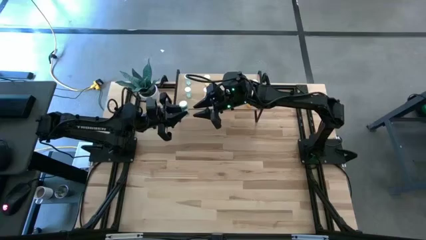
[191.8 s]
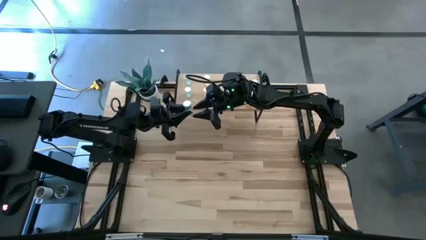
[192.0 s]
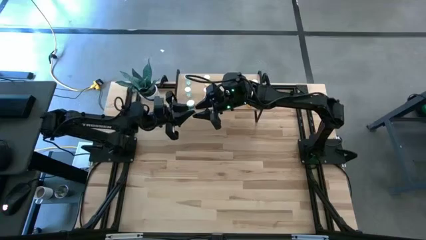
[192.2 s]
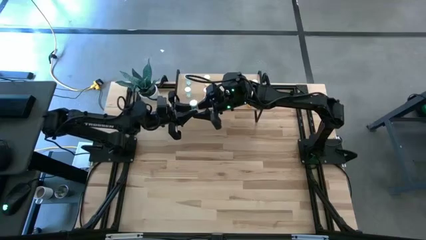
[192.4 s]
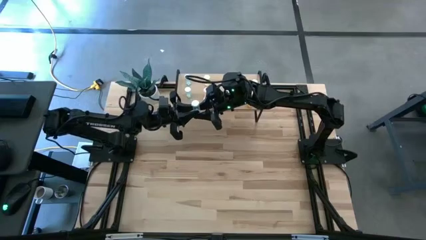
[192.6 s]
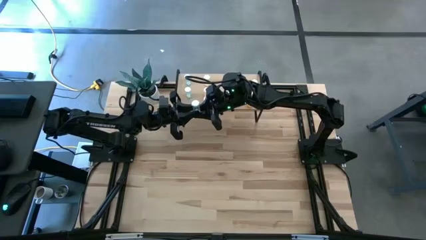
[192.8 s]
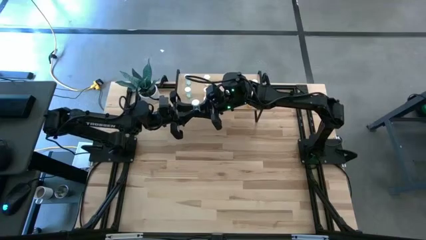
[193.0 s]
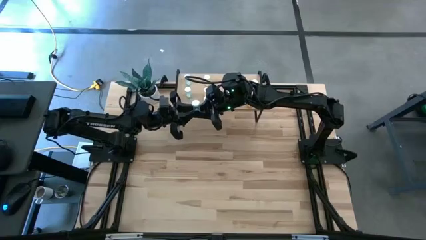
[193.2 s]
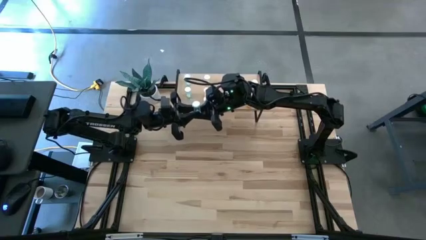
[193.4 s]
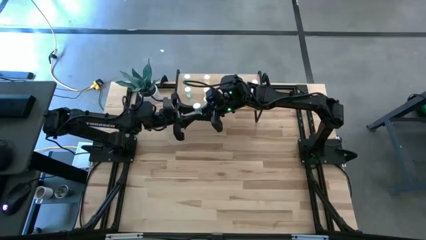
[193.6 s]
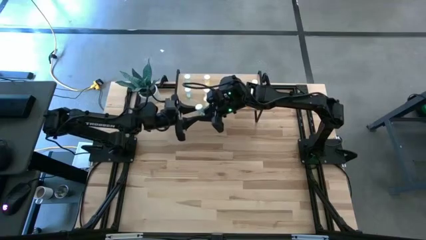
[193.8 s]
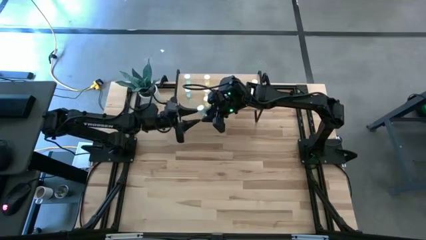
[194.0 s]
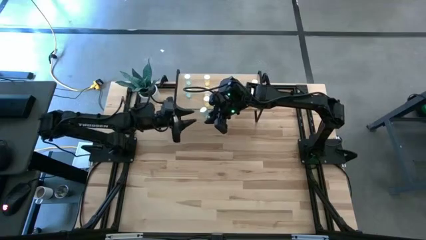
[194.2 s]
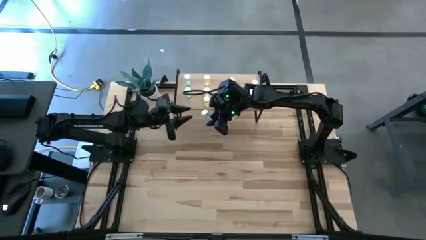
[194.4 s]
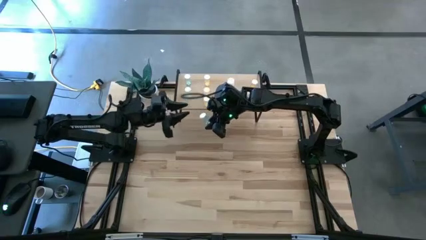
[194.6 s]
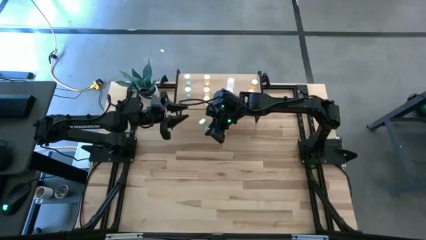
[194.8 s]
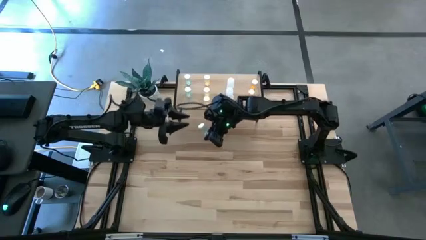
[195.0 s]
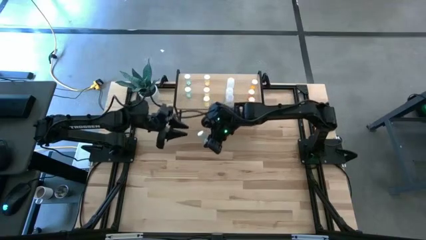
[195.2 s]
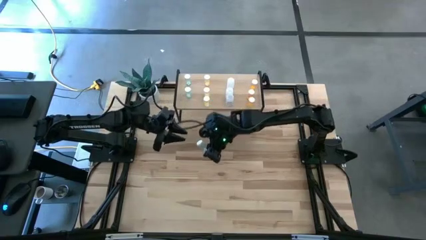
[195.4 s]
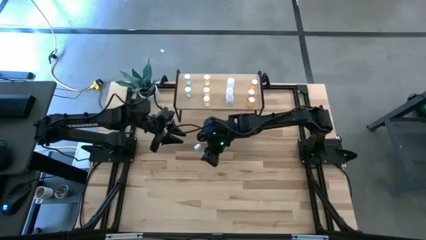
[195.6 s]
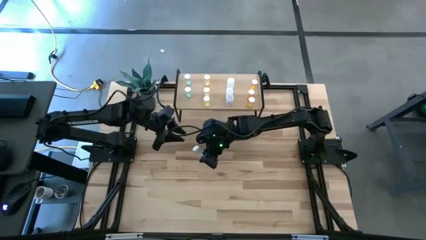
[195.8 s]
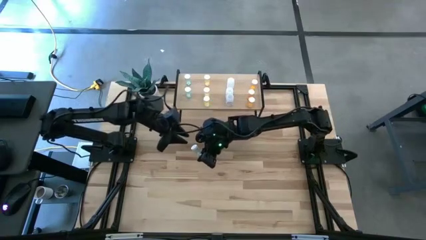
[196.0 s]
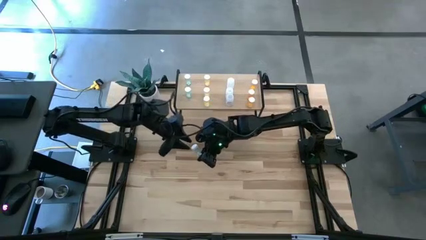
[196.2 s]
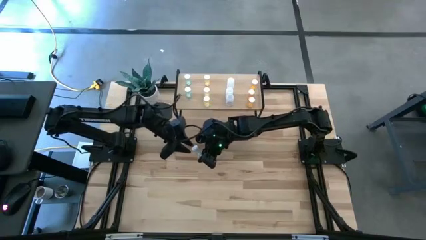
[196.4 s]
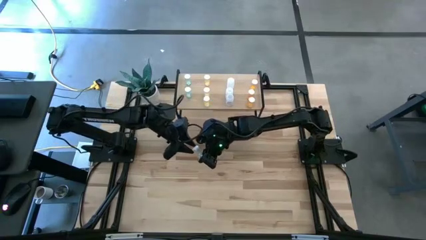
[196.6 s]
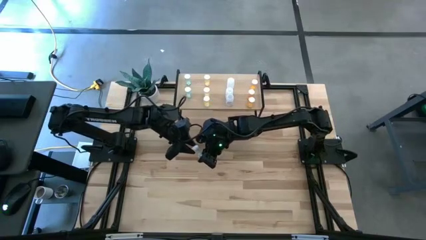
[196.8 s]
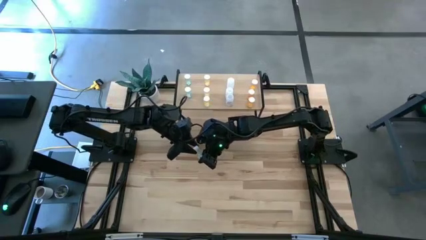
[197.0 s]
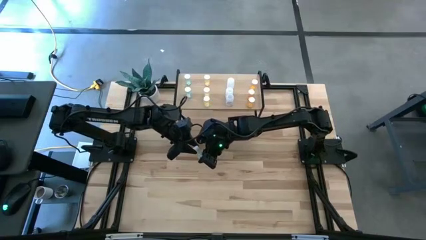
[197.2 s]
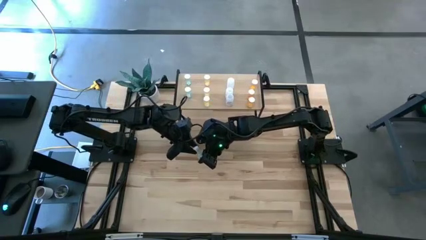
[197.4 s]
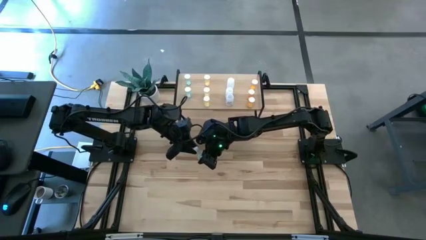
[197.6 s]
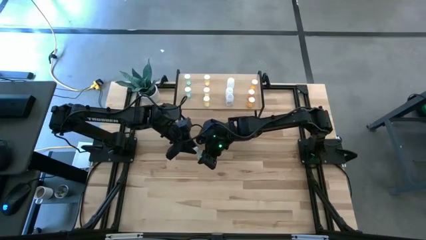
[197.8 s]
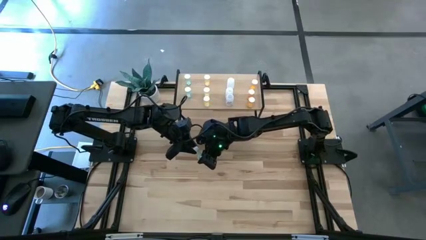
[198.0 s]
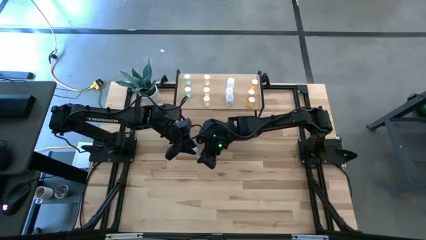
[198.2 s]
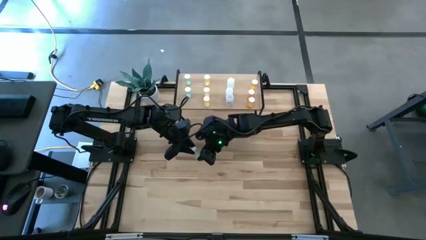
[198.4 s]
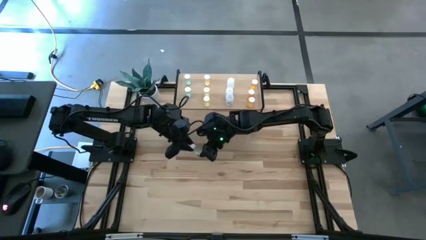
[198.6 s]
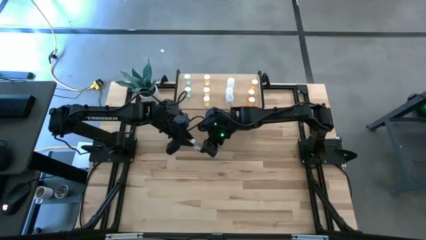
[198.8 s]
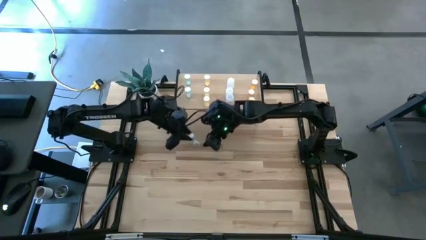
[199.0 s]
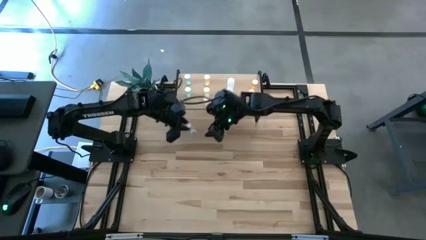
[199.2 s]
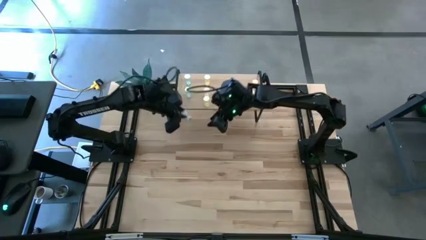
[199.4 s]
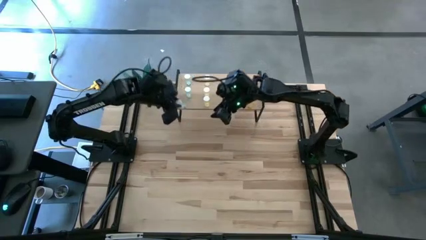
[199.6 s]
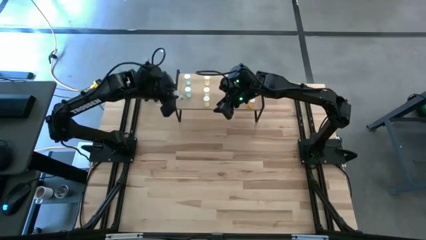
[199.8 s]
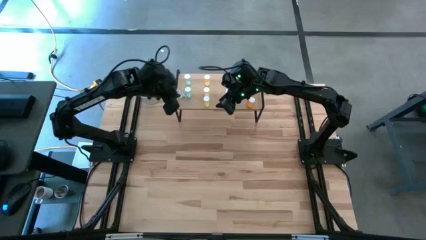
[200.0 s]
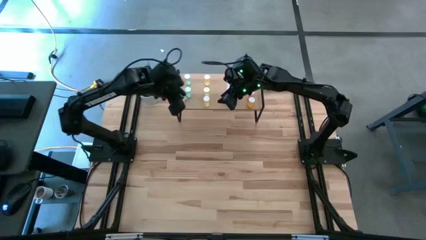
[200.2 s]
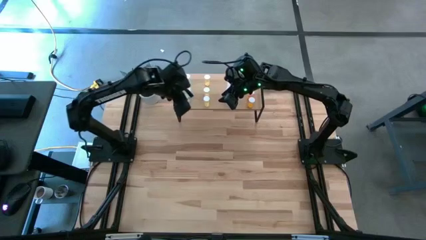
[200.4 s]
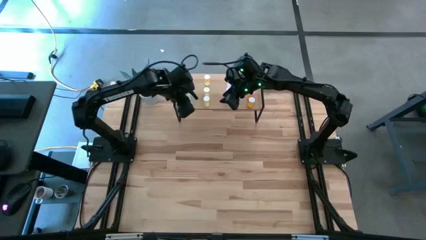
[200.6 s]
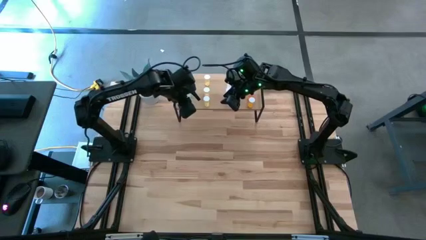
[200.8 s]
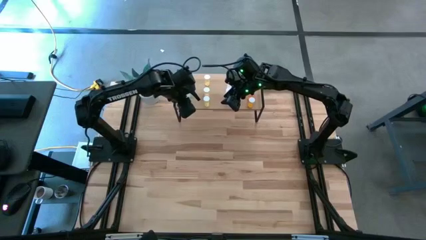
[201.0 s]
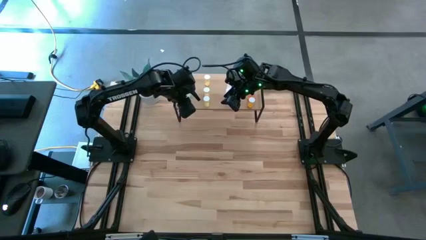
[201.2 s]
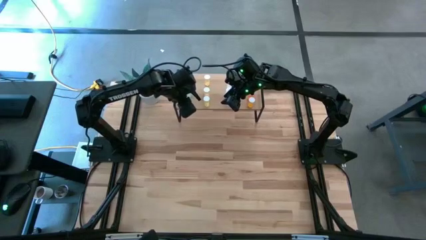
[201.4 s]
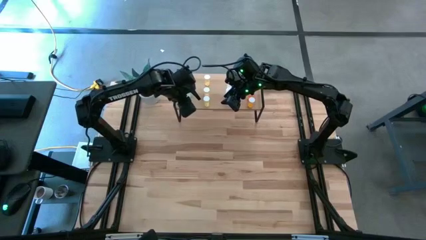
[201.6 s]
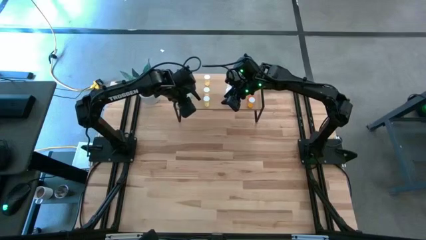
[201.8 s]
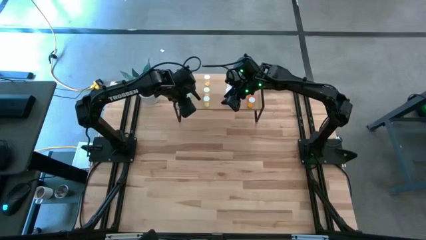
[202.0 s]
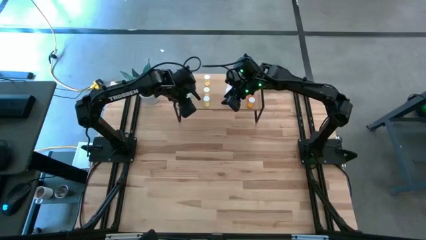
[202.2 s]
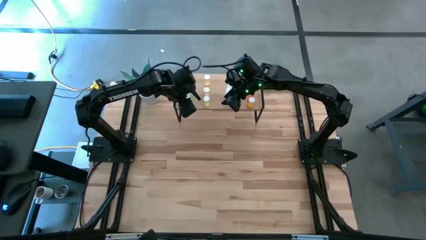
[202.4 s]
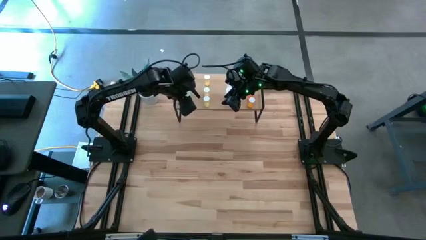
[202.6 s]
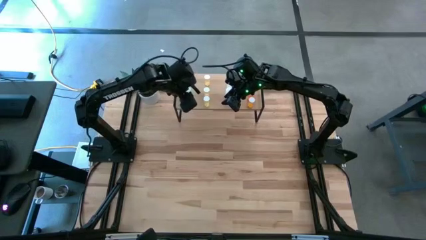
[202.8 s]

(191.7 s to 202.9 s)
Task: Pick and place medicine bottles onto shelf by color
Put the blue pill bottle aligned with the other blue pill bottle on the shelf

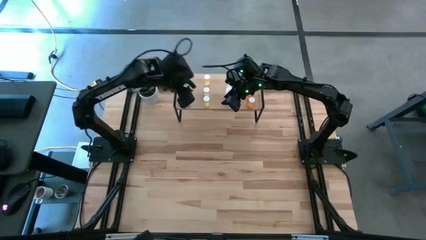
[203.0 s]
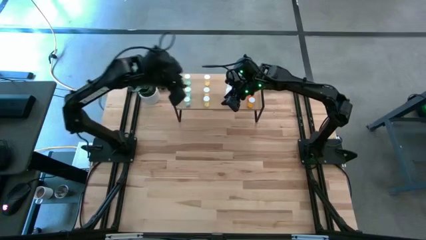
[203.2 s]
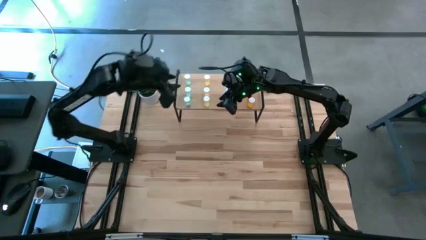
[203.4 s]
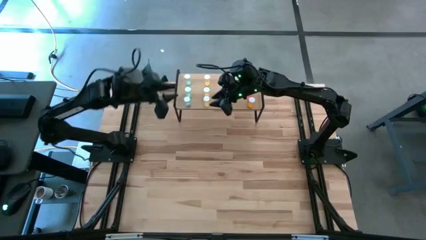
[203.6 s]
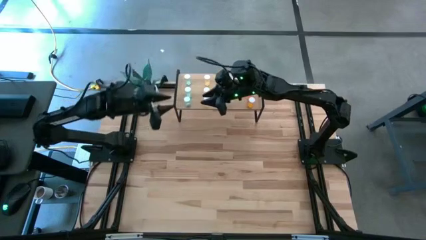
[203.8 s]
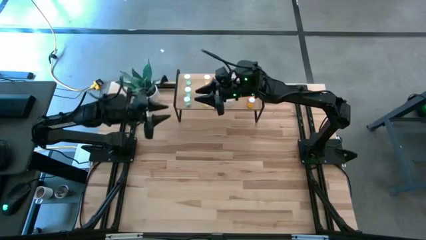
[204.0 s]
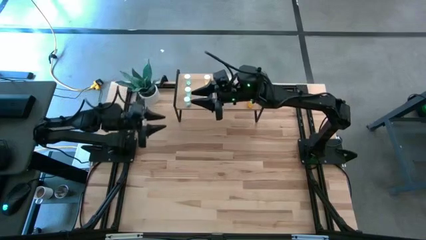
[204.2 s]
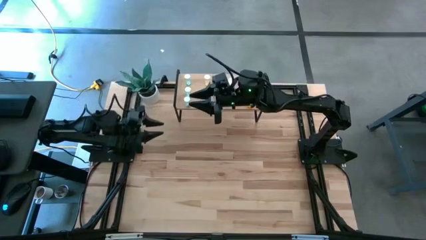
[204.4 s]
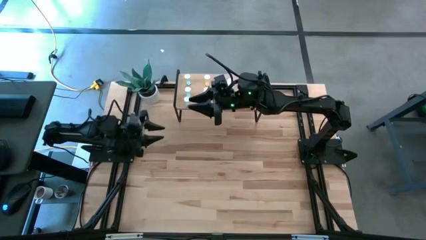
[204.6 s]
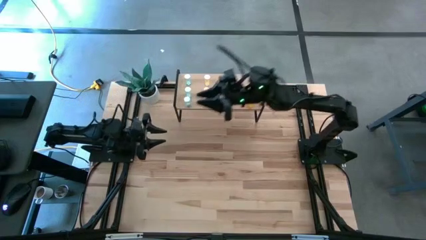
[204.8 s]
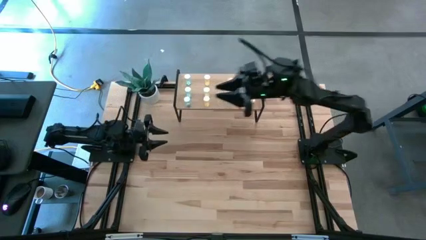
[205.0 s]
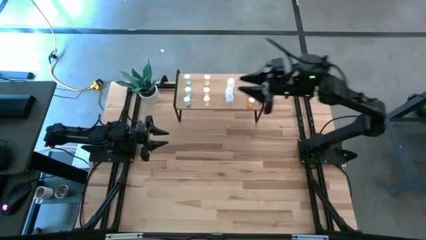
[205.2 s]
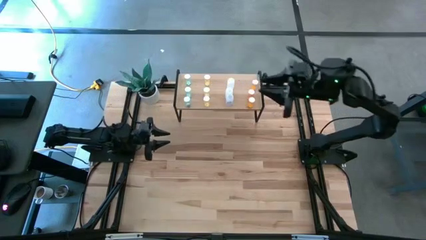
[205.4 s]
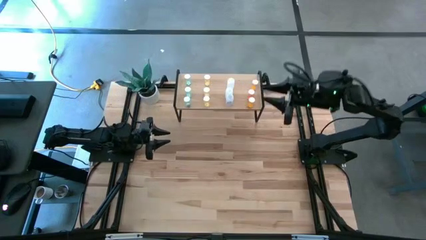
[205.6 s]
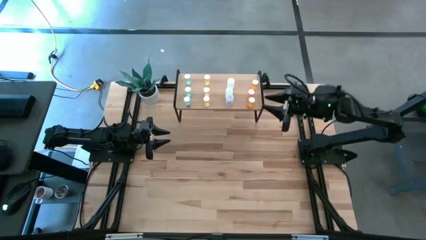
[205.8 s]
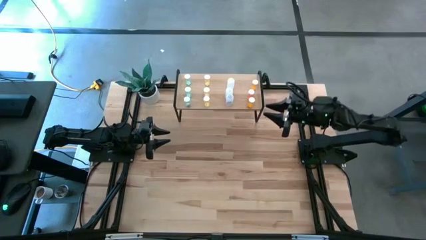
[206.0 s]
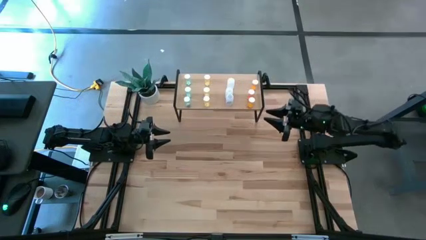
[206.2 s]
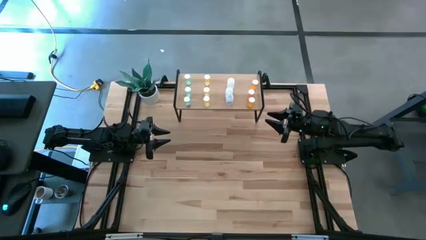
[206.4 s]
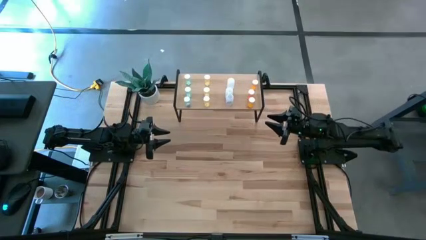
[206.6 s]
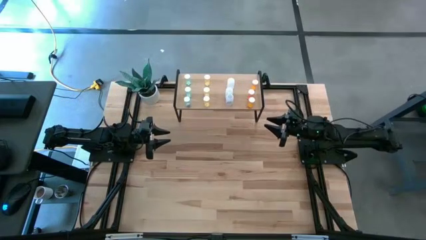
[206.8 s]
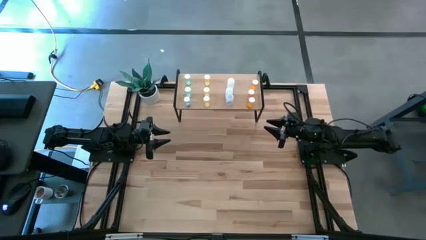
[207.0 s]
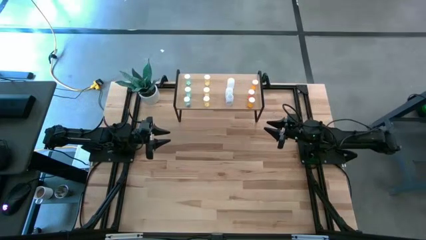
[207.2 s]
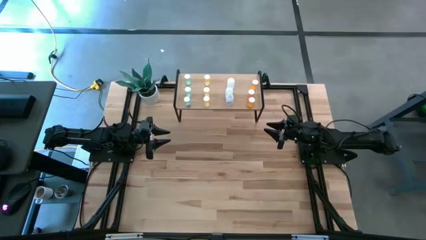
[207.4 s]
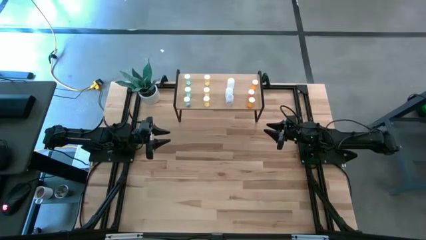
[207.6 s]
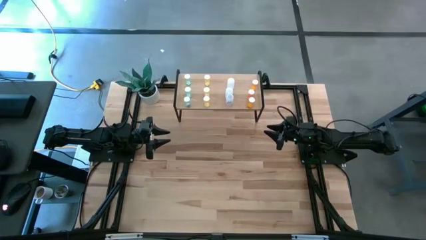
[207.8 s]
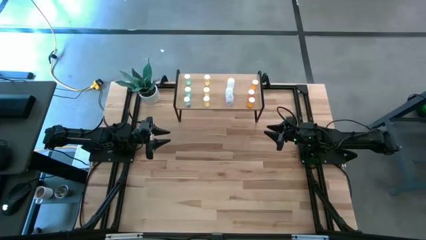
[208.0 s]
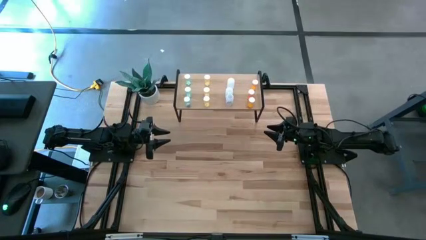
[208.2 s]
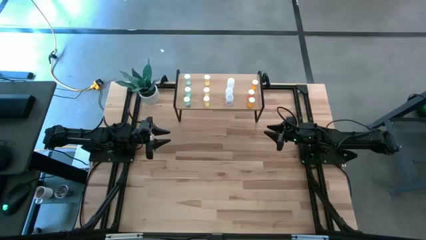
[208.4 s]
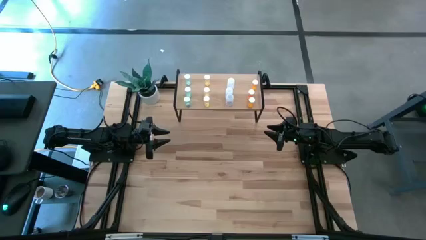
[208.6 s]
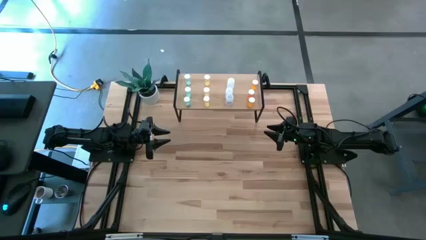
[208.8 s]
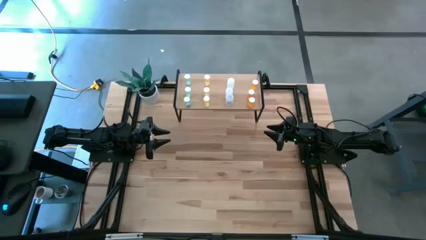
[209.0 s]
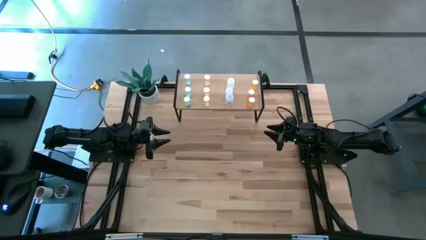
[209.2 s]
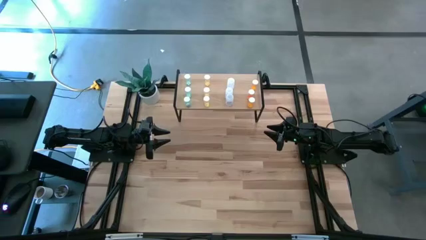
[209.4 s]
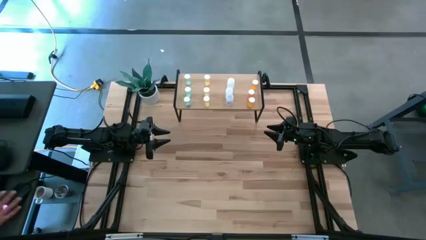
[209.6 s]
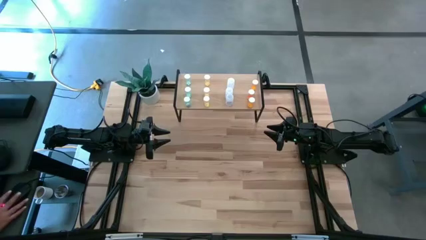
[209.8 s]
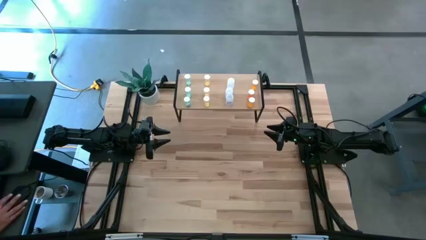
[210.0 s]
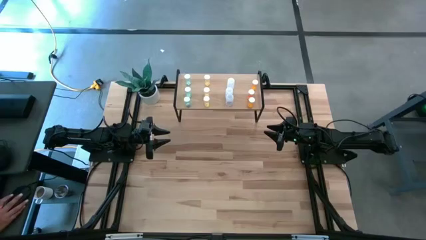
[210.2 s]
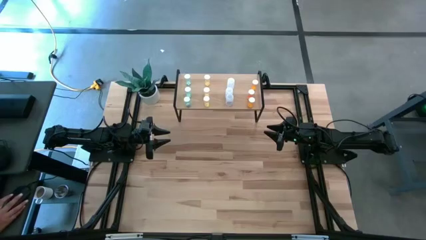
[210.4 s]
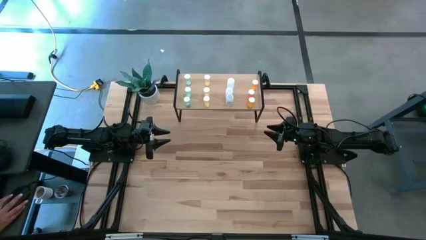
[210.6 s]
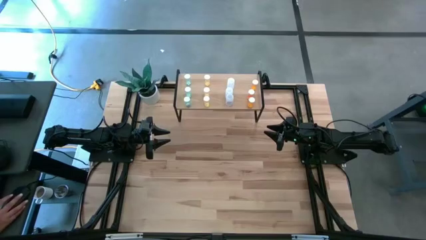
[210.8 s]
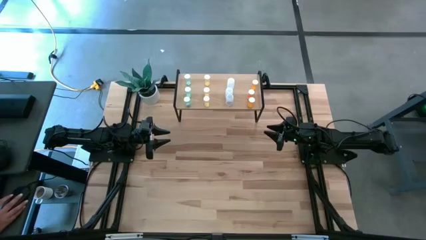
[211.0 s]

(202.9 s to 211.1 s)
Return to Home Position
